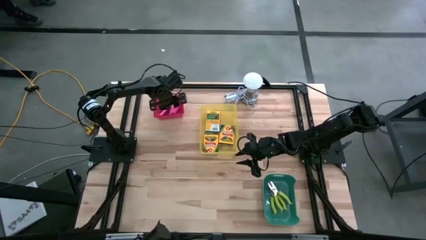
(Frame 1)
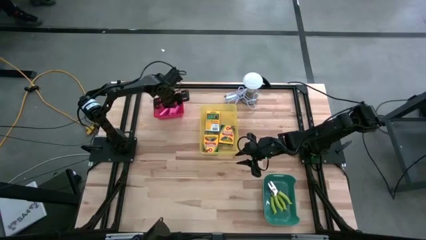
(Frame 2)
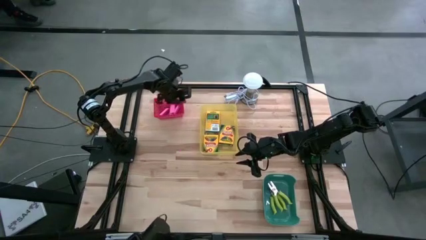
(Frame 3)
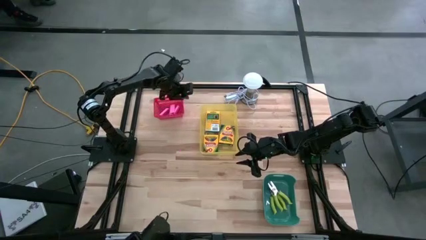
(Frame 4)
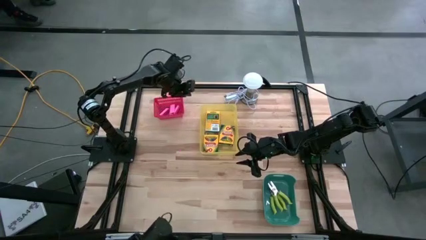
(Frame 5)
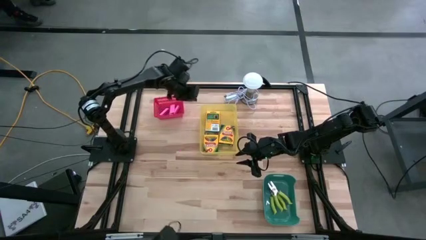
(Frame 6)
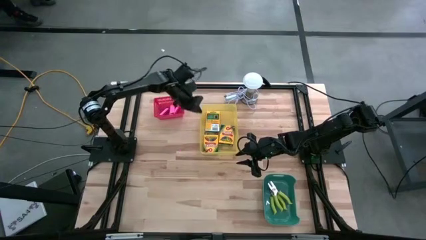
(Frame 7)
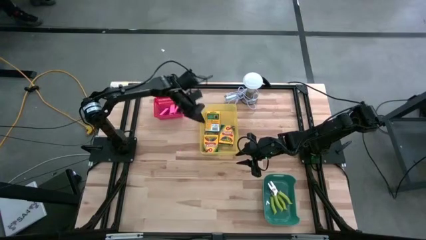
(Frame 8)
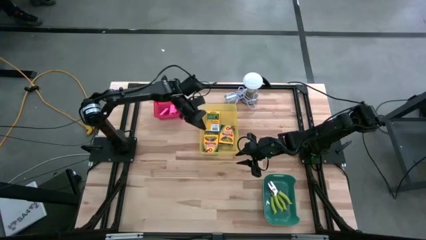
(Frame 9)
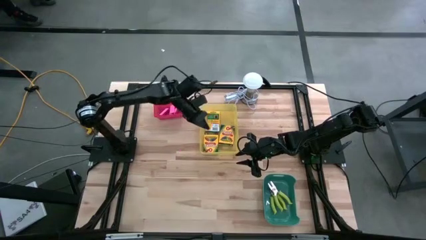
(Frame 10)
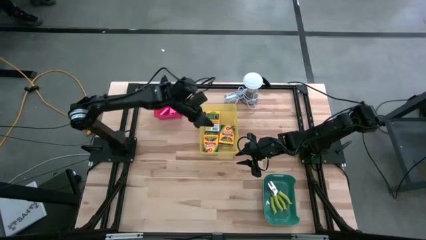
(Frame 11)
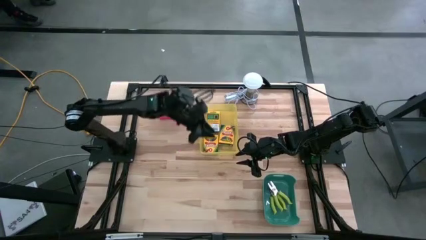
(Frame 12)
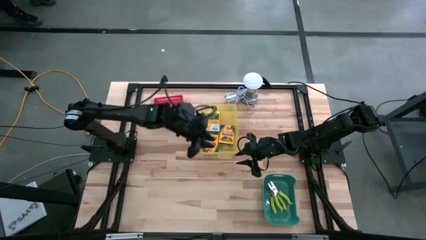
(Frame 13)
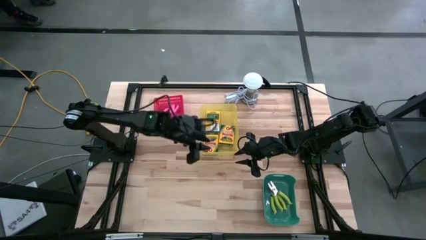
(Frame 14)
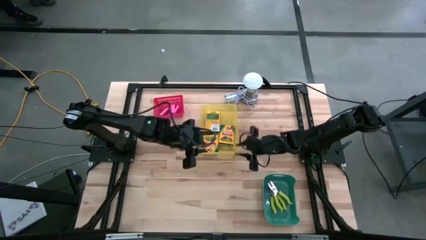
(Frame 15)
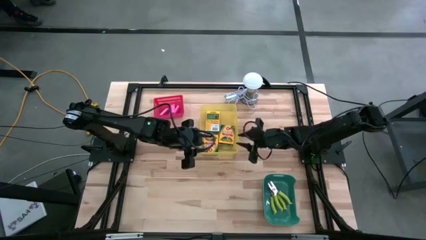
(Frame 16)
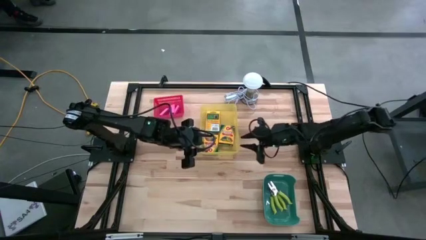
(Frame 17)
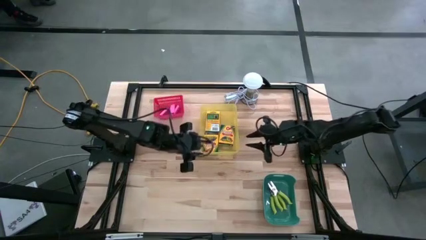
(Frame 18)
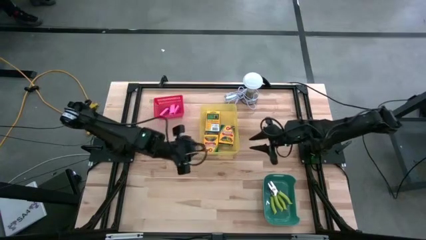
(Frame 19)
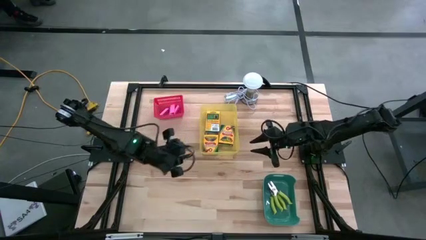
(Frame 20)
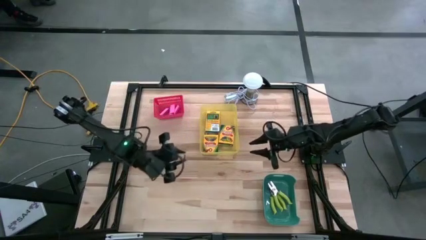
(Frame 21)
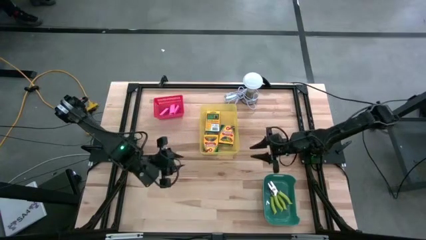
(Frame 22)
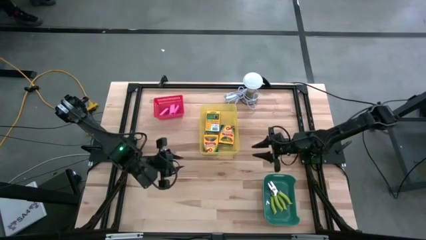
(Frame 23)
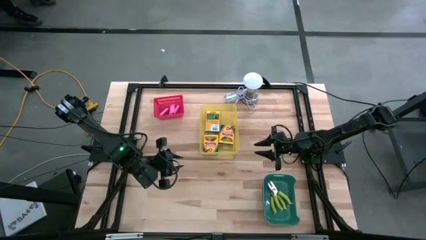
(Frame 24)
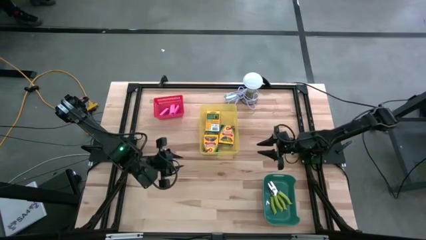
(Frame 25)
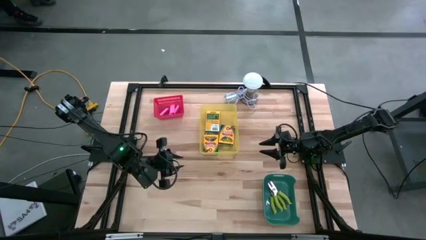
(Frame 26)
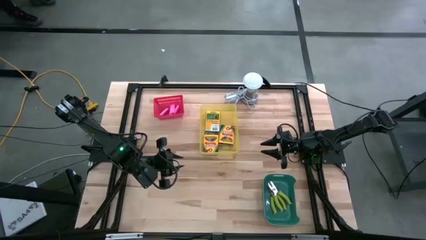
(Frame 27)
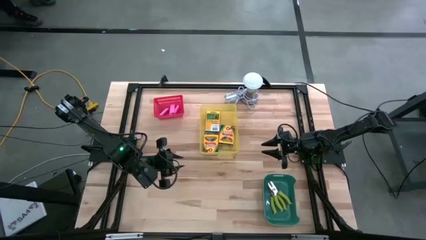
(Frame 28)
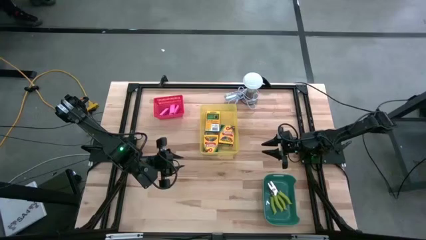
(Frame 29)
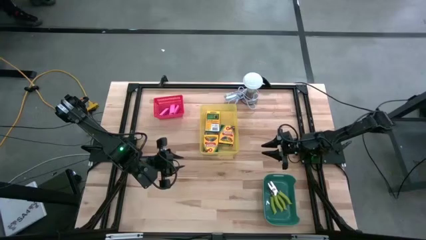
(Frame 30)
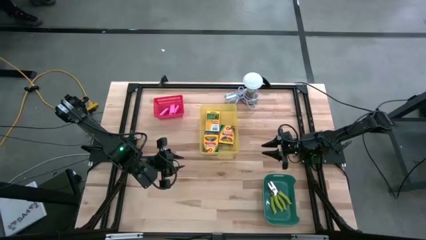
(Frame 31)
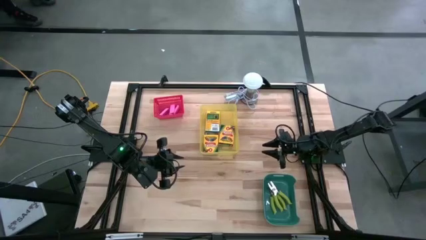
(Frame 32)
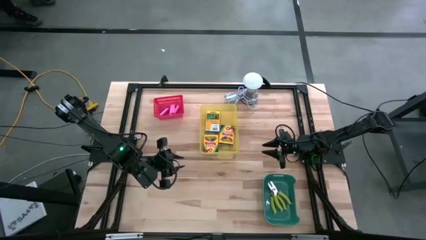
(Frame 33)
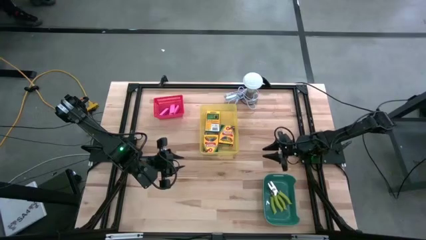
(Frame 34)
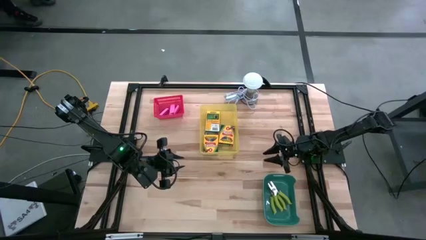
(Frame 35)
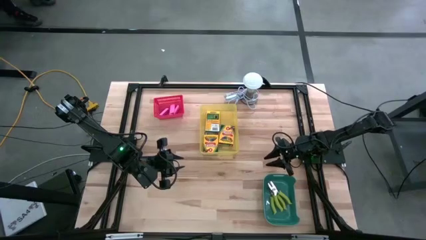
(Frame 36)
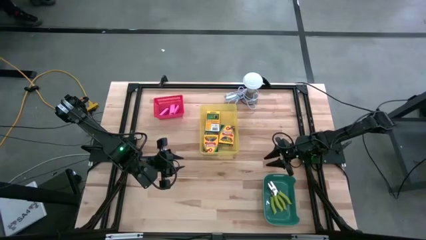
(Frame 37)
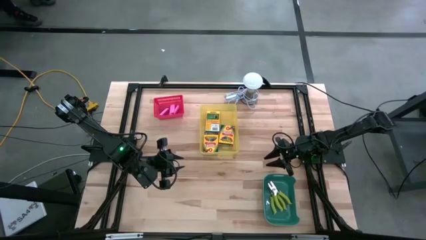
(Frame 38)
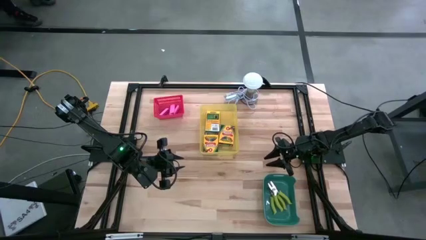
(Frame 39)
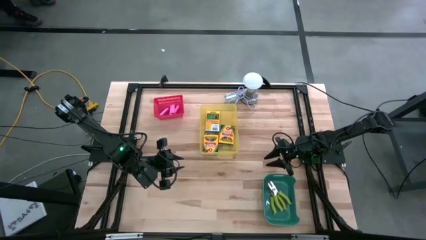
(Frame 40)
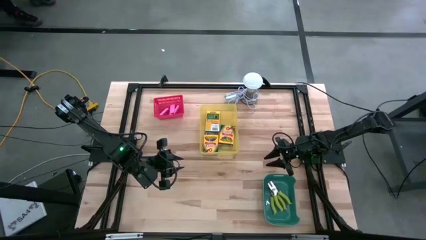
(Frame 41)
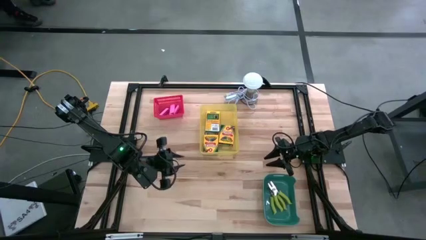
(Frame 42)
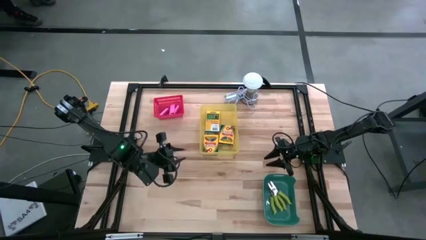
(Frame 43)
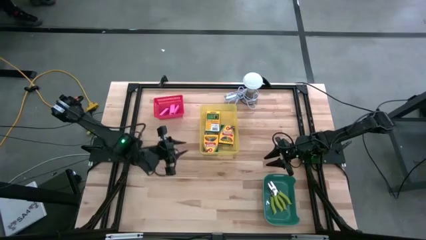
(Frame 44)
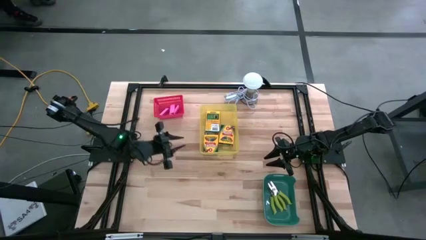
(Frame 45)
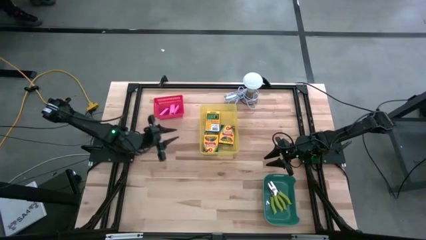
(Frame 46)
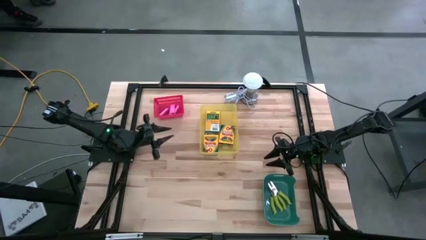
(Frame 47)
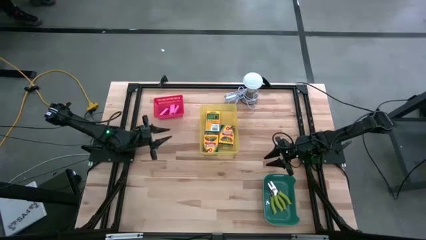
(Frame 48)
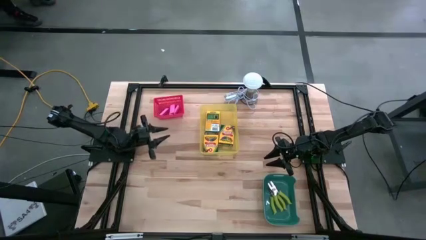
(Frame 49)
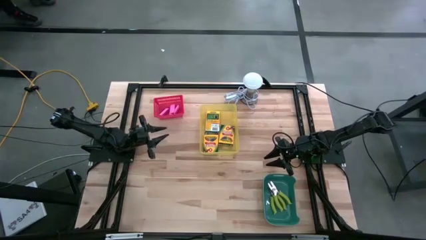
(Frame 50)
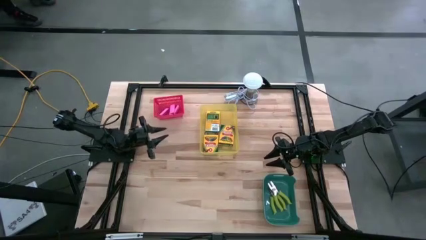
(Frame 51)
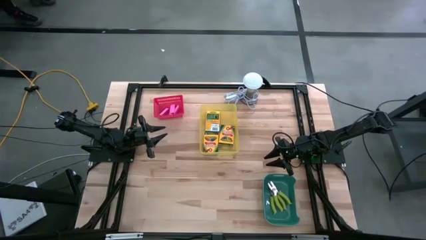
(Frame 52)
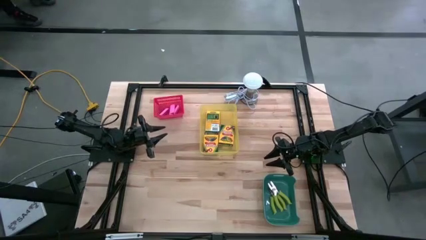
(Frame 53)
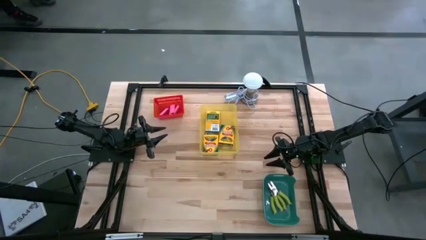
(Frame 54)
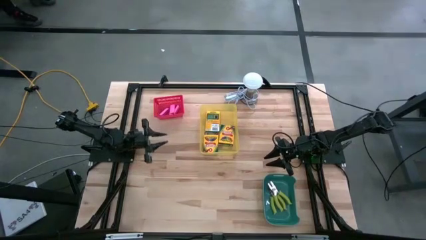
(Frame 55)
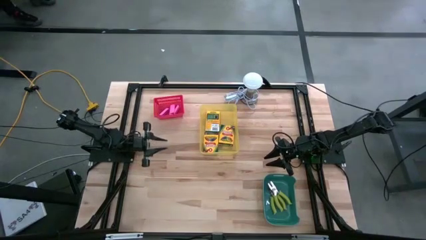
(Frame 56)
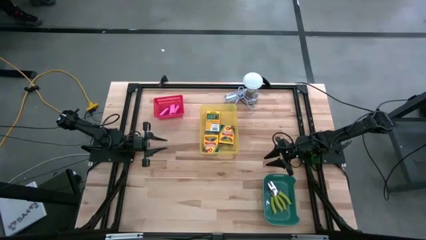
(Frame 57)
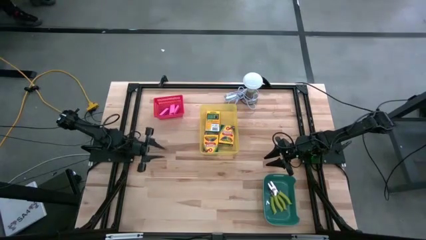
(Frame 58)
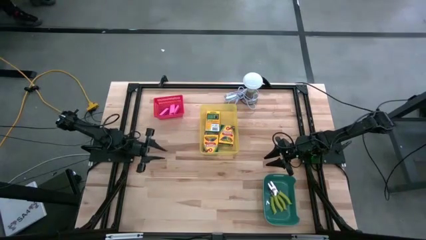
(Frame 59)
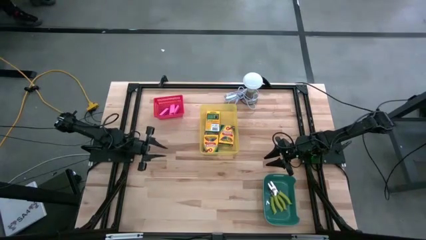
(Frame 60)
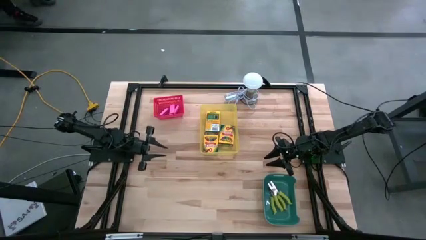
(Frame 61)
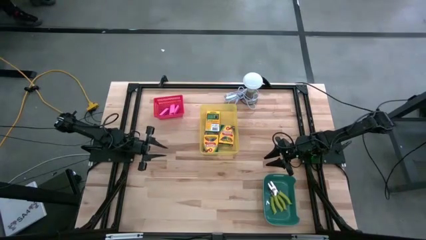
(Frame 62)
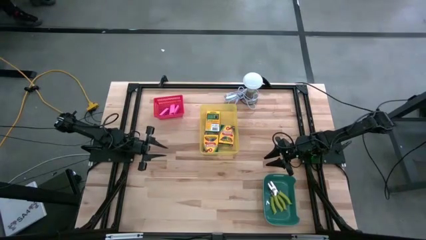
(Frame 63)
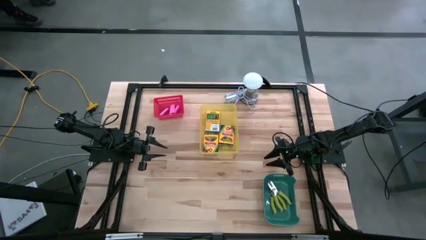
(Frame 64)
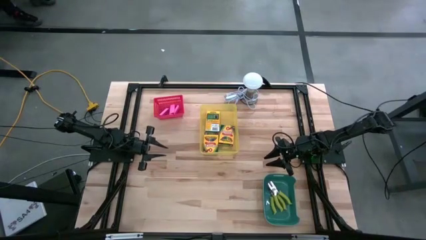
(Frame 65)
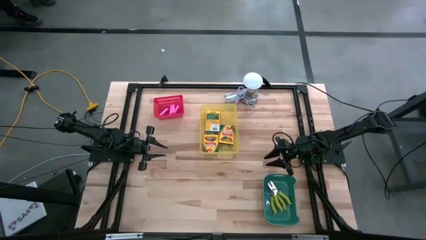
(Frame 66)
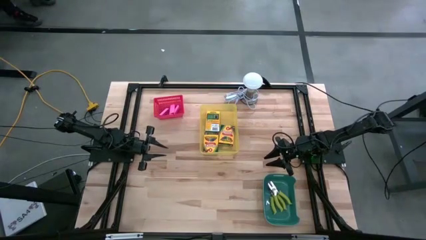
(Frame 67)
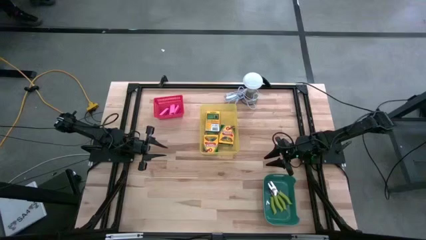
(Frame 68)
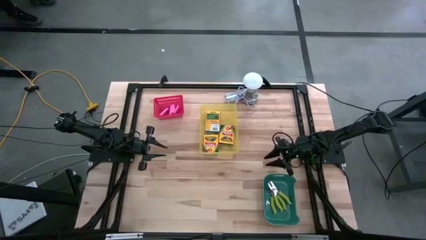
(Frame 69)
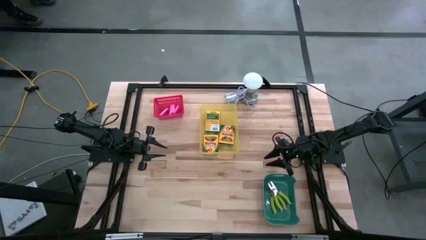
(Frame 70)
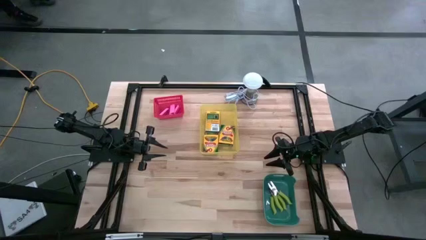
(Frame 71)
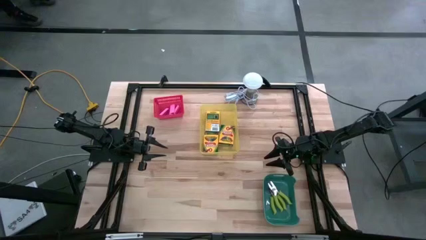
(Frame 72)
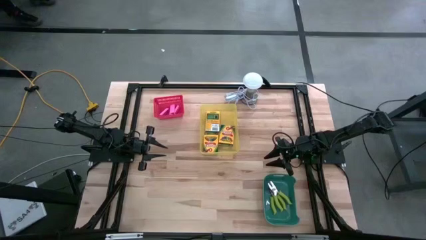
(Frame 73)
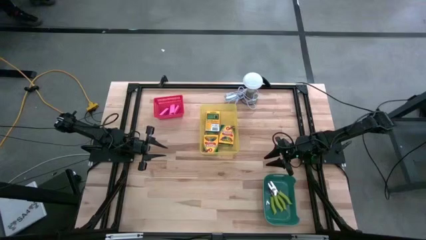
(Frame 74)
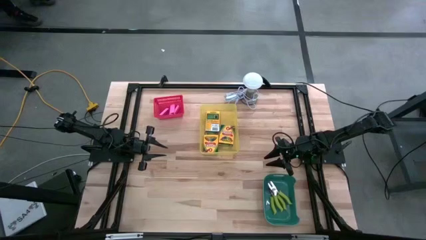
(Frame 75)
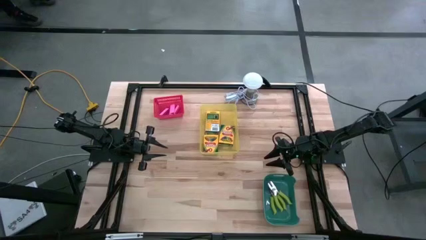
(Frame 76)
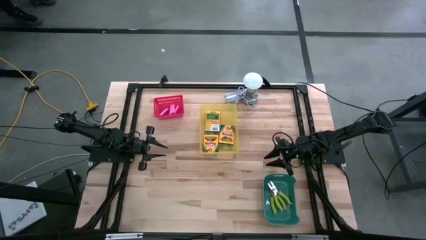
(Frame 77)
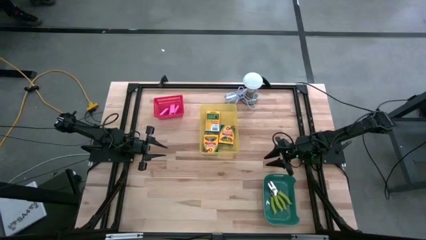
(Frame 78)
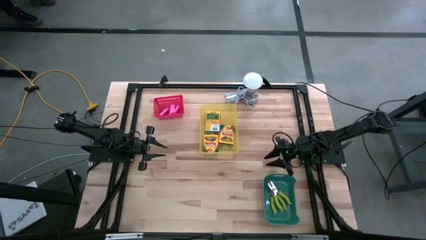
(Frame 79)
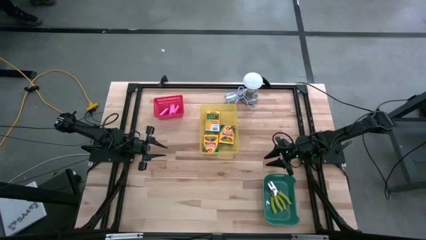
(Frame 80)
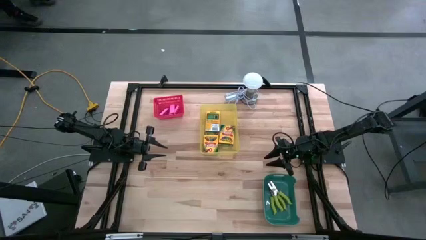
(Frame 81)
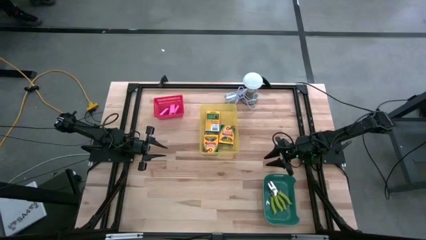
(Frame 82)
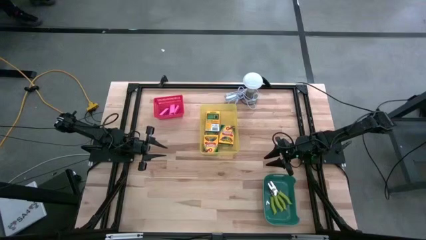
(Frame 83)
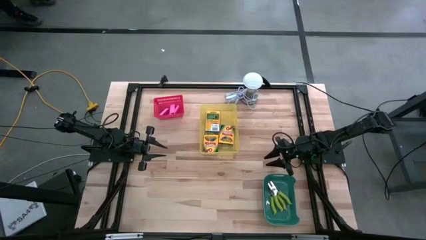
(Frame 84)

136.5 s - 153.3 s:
Task: Pick & Place School Supplies
Return to Home Position
